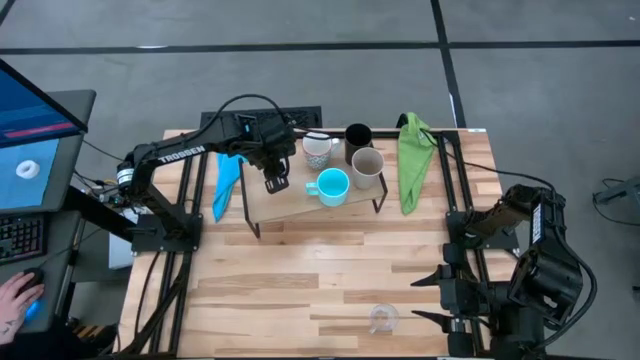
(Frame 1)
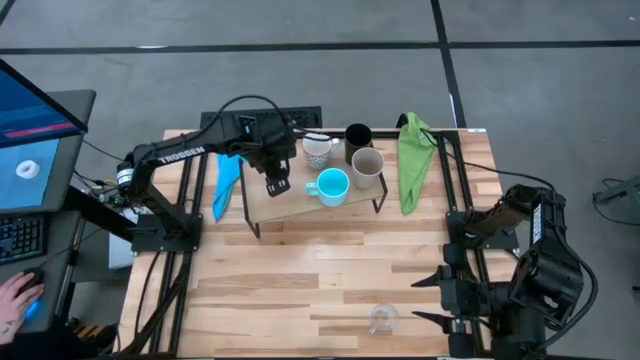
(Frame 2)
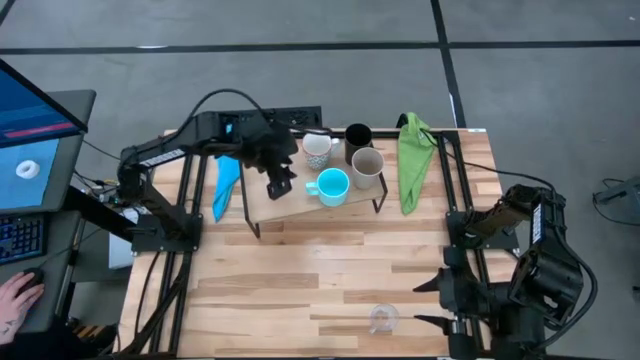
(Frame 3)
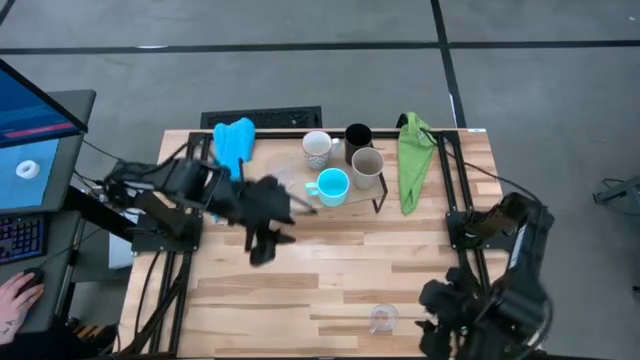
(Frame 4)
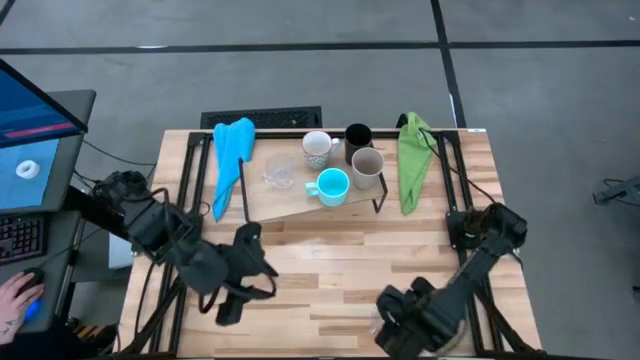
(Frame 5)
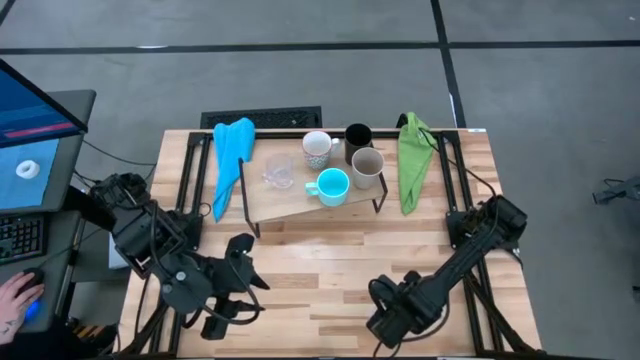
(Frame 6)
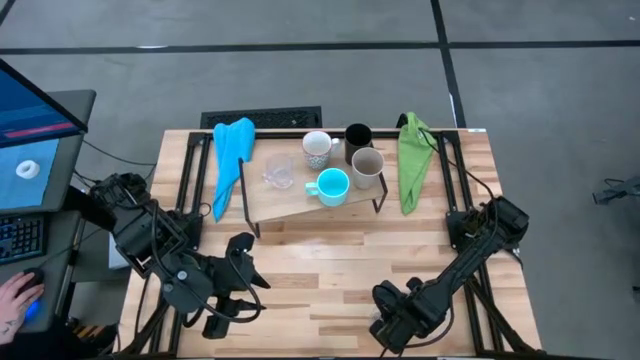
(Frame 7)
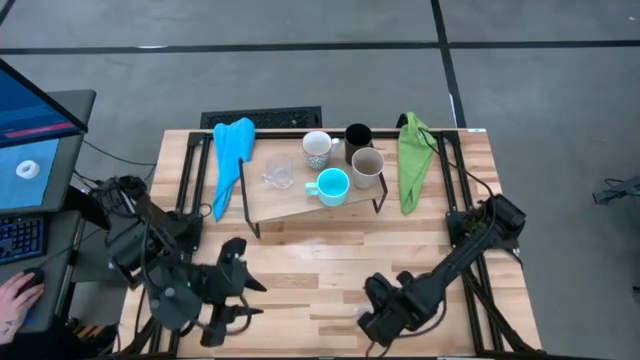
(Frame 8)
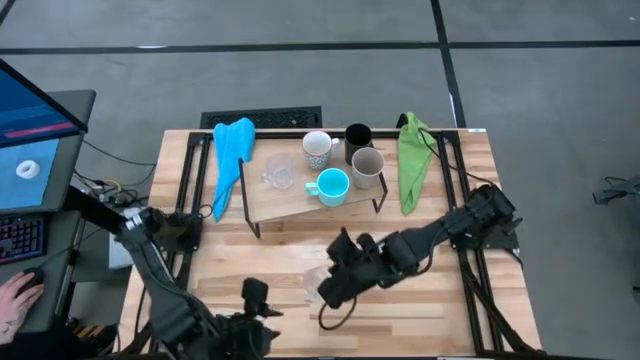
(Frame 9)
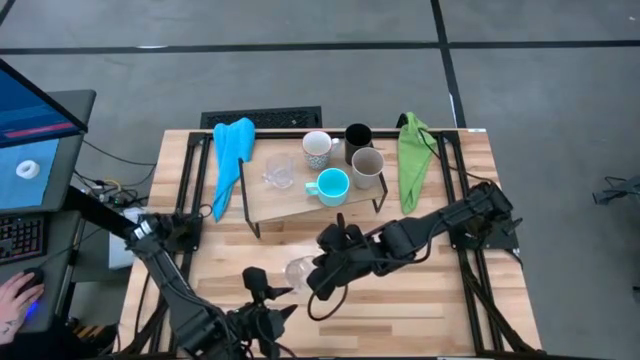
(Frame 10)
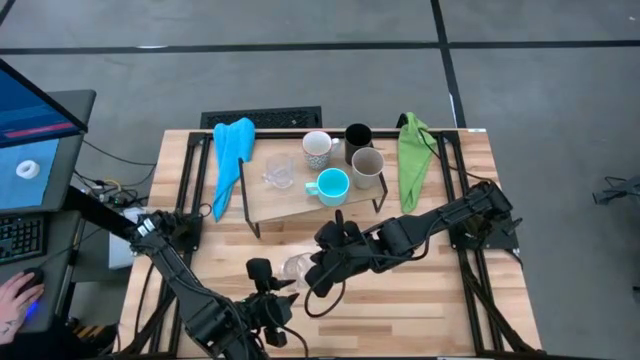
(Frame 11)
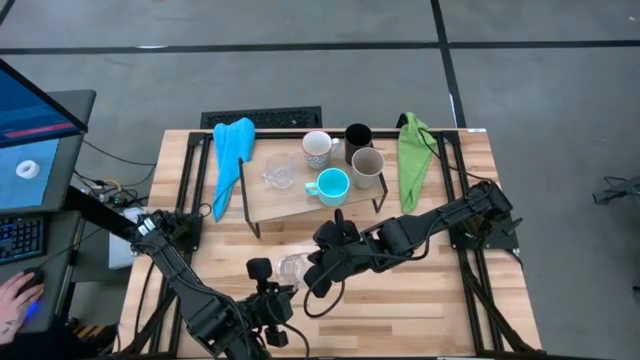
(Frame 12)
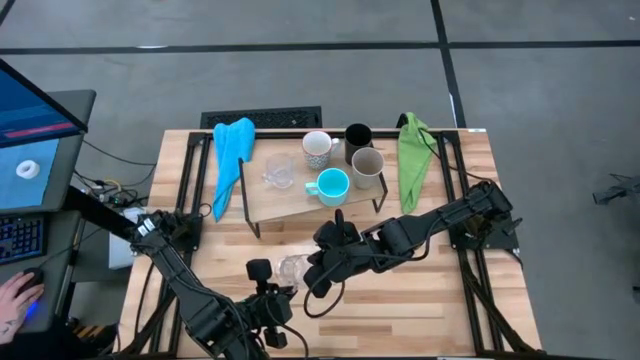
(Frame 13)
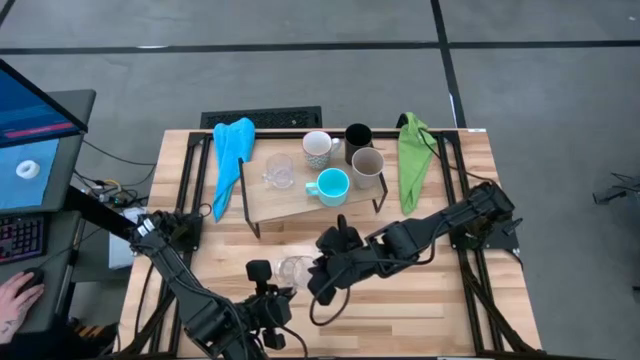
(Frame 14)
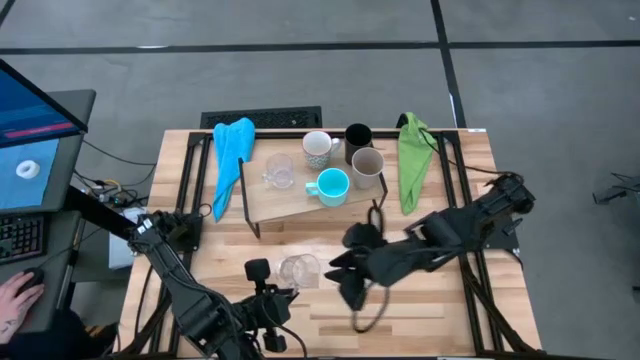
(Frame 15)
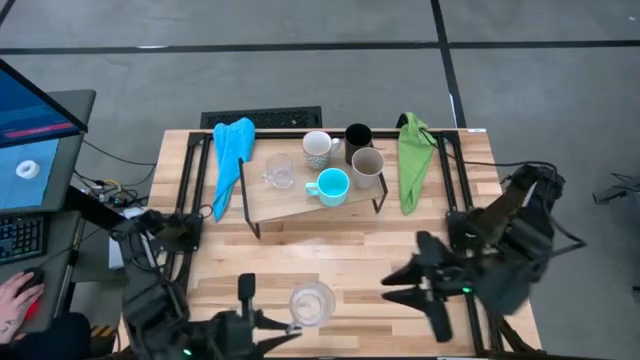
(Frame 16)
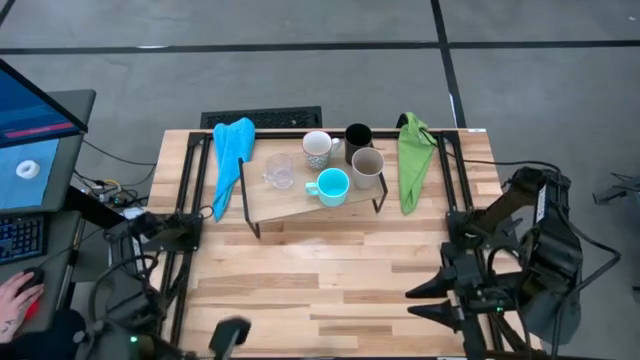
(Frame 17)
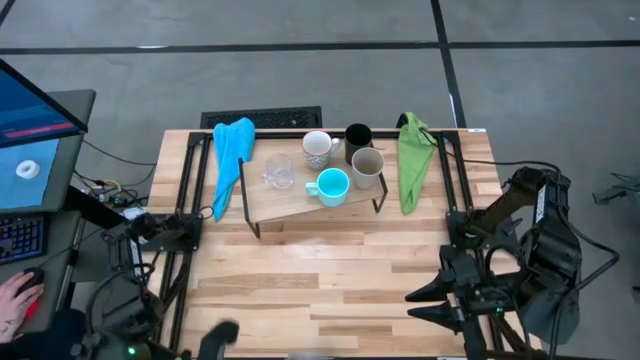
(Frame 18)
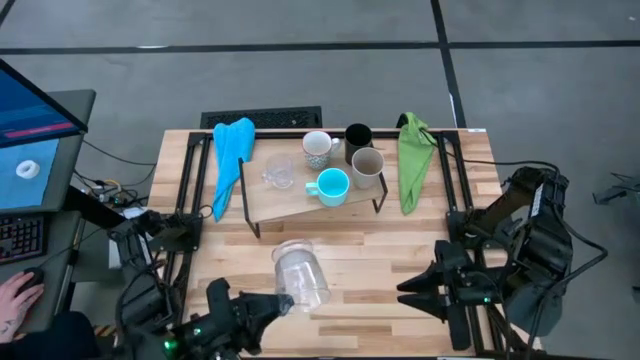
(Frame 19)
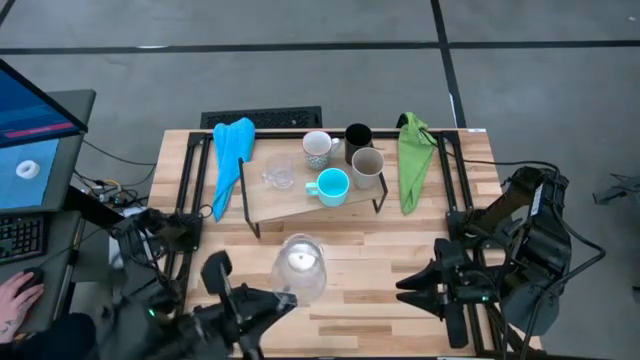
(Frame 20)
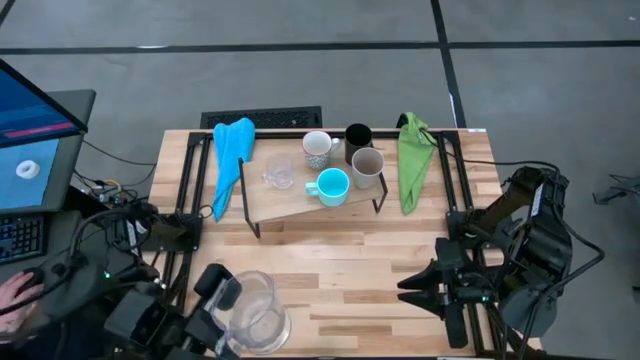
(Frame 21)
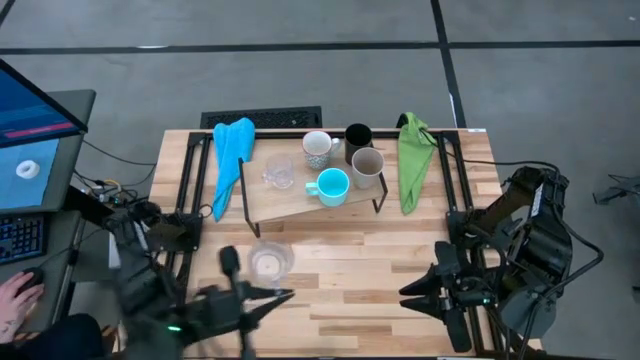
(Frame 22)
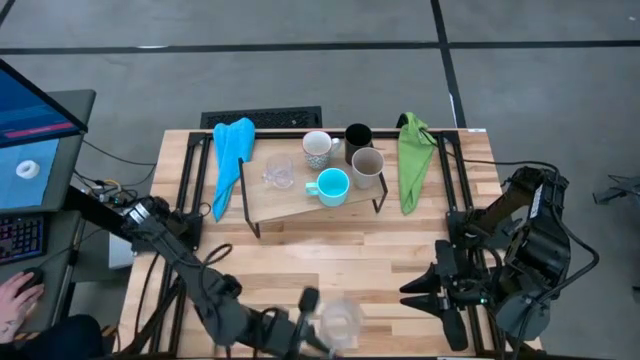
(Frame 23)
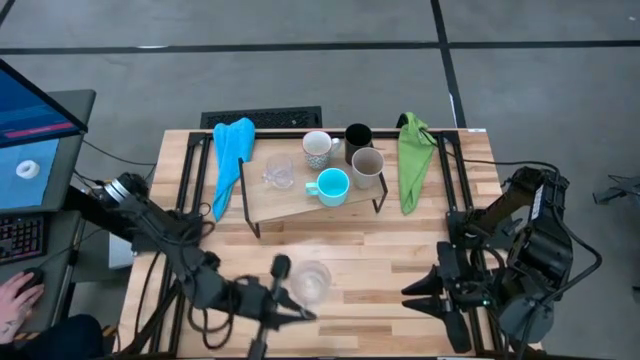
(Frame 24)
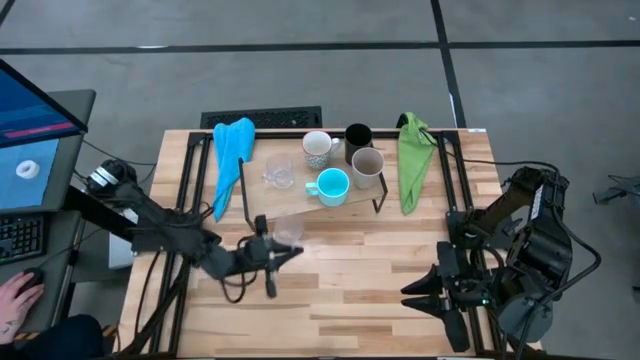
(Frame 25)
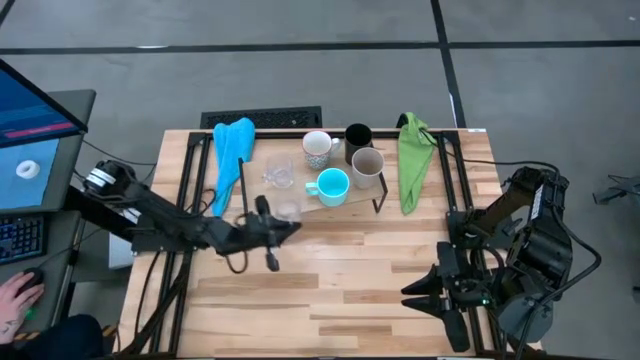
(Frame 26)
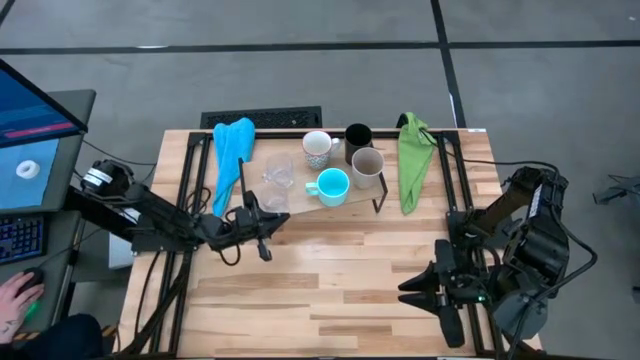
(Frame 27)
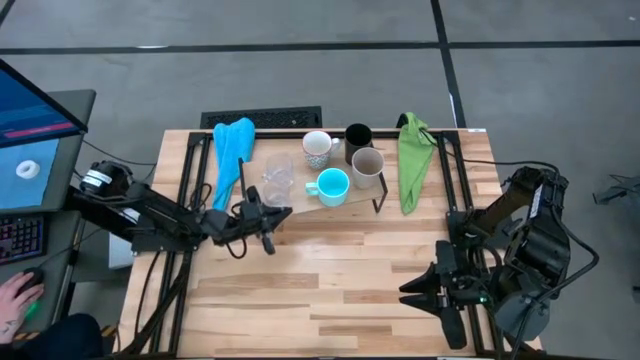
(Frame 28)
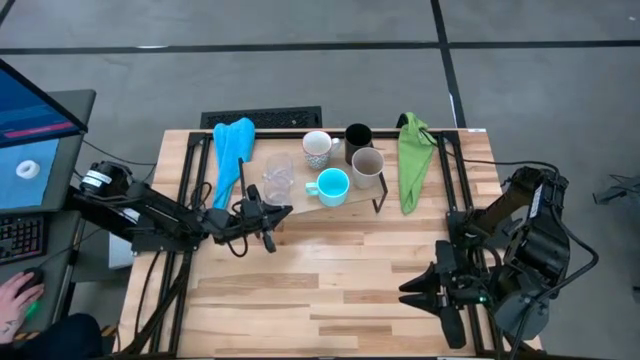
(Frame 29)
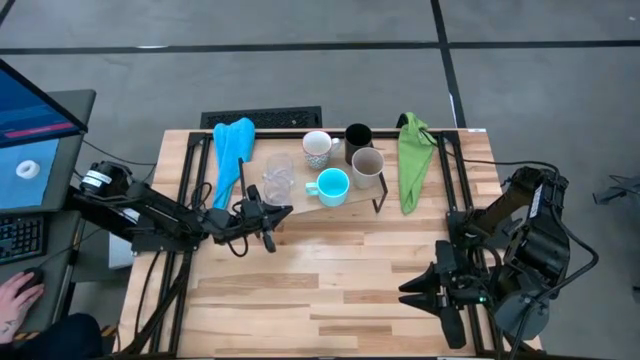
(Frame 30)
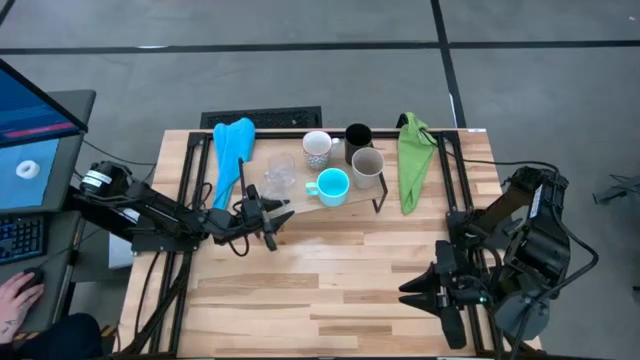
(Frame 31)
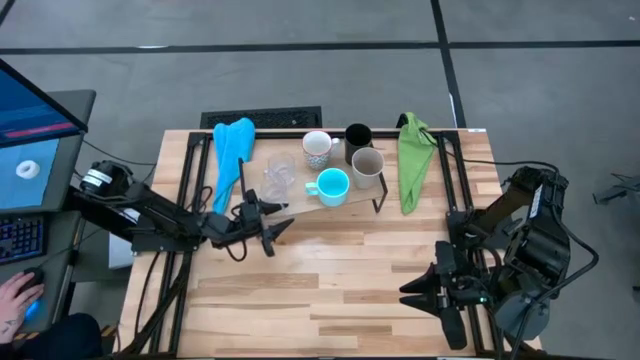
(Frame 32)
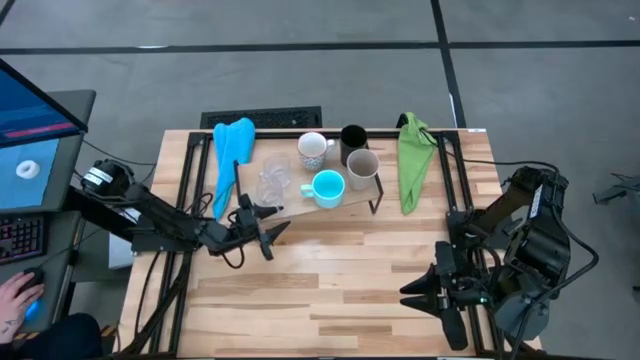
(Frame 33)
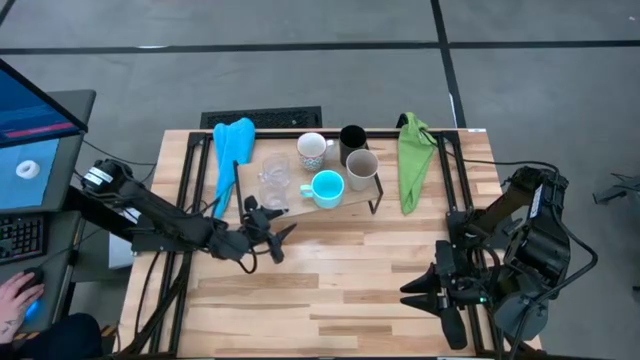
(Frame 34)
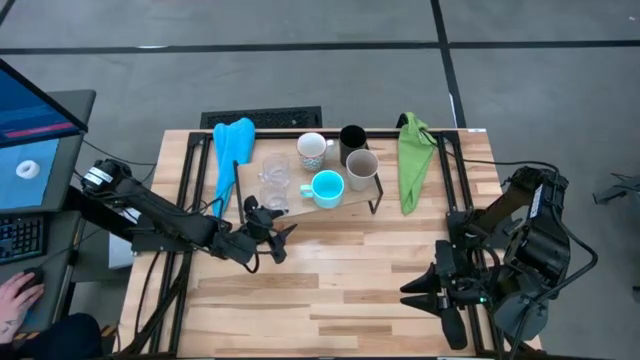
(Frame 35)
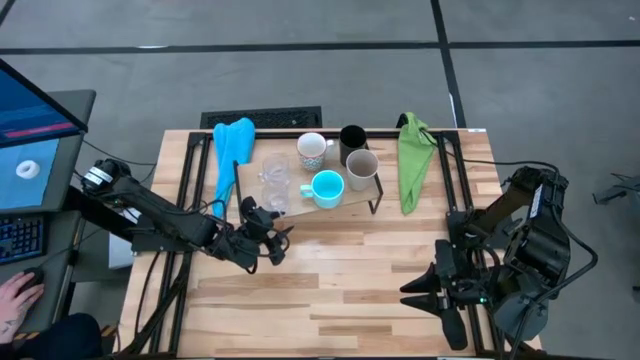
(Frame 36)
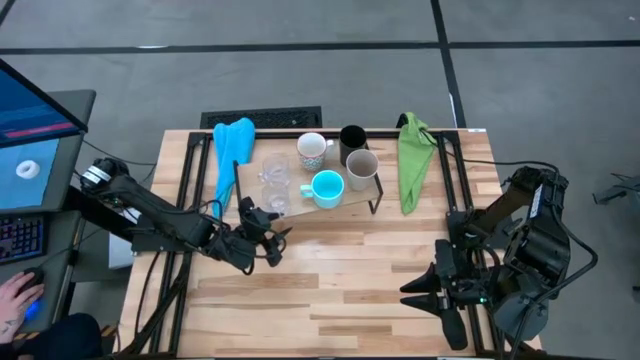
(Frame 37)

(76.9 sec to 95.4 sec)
Task: Stack small to large cups/mugs on shelf
Put the transparent mug on the shelf

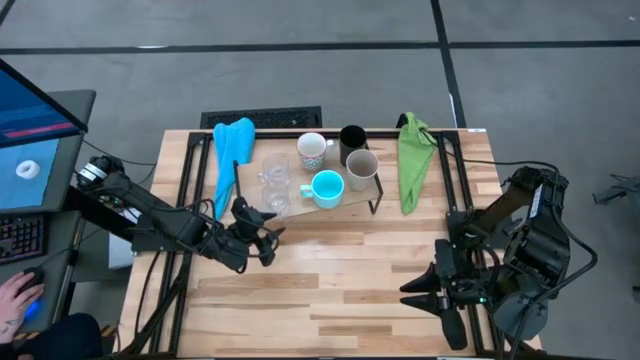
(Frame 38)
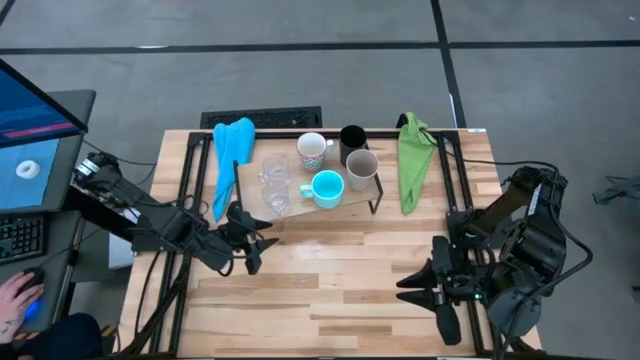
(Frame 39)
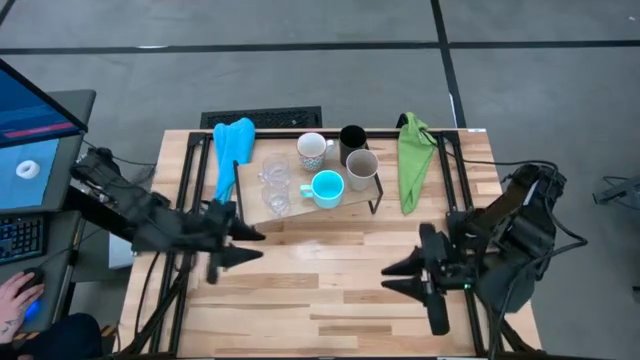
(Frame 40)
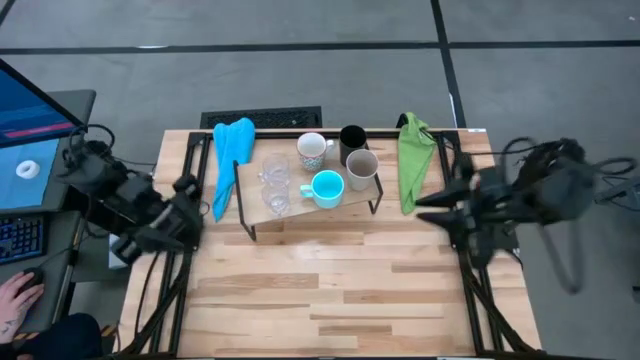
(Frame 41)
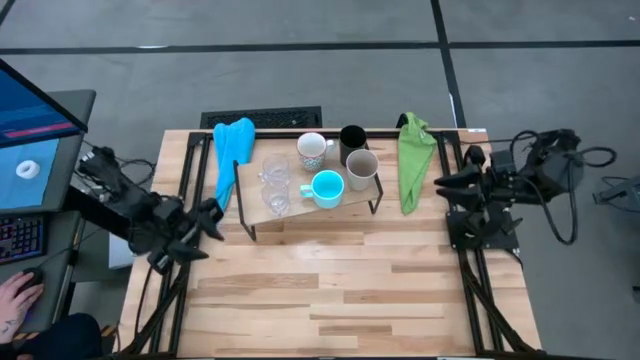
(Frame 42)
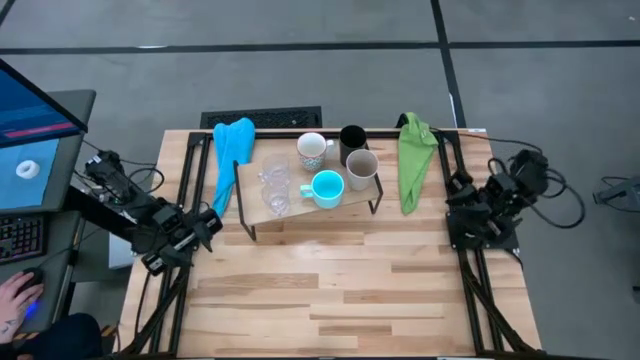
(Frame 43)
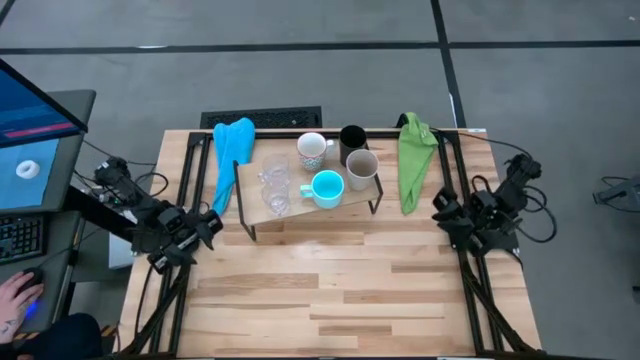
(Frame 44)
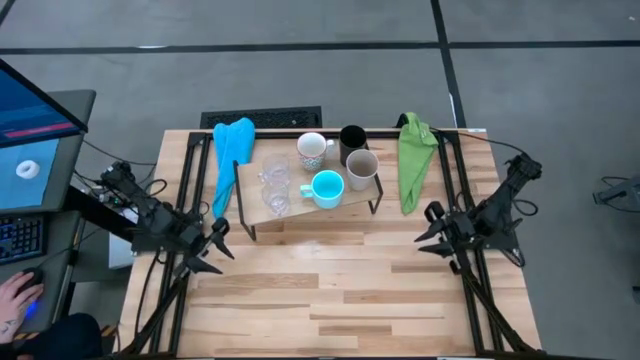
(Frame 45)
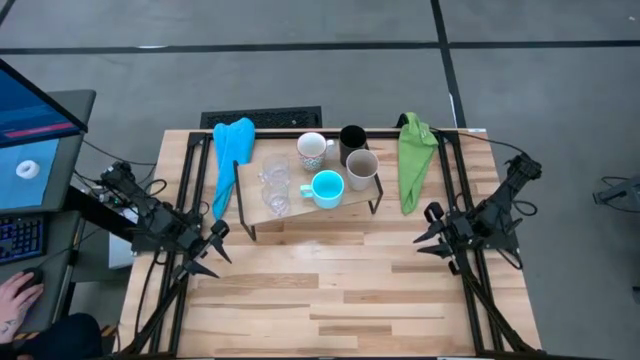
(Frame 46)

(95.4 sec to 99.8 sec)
Return to Home Position
